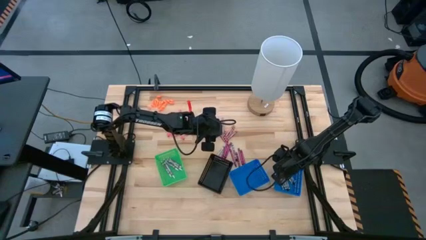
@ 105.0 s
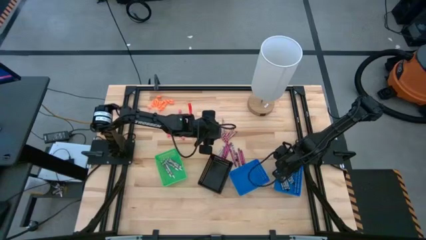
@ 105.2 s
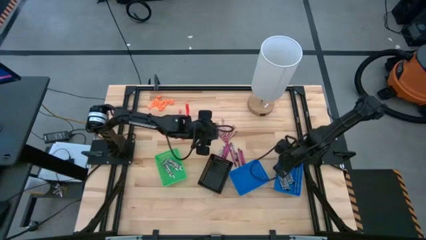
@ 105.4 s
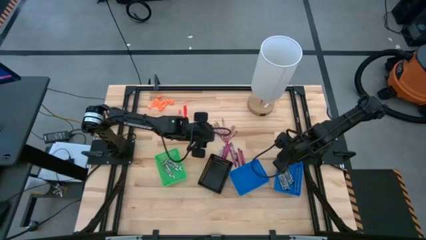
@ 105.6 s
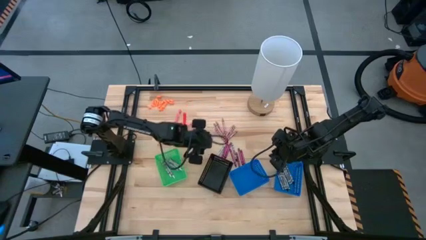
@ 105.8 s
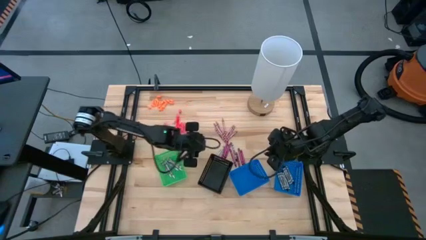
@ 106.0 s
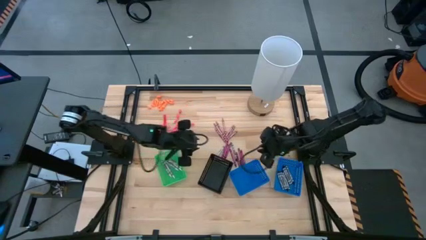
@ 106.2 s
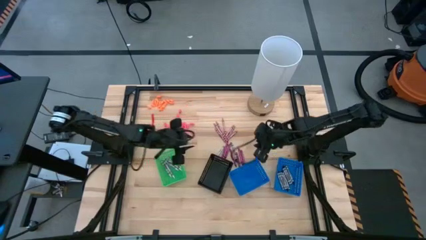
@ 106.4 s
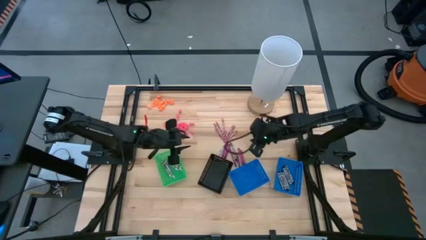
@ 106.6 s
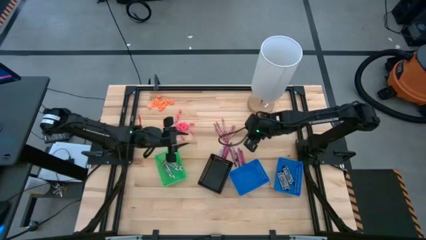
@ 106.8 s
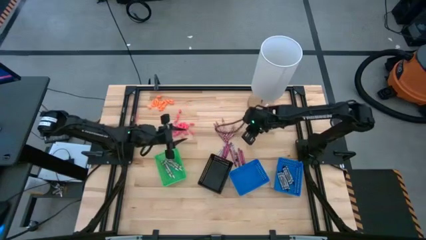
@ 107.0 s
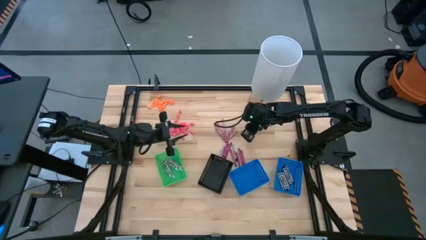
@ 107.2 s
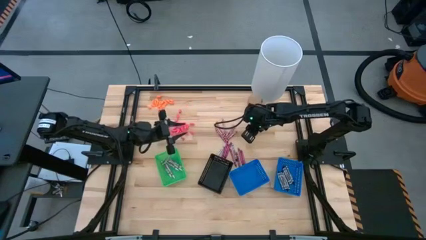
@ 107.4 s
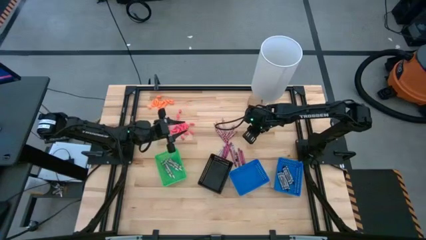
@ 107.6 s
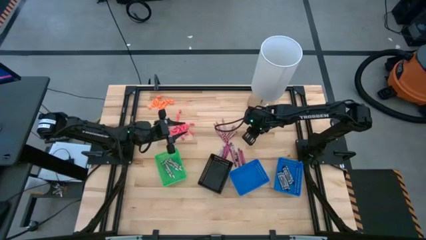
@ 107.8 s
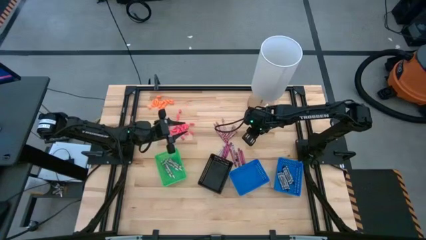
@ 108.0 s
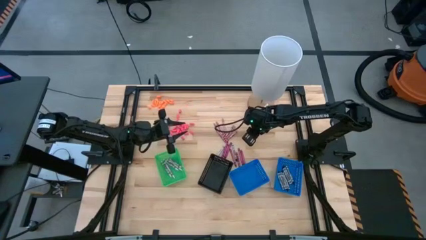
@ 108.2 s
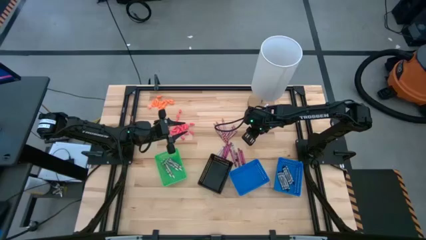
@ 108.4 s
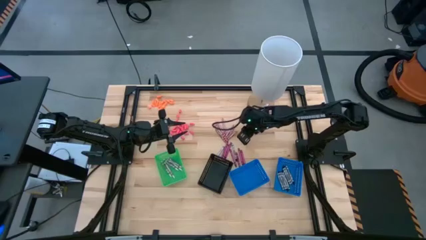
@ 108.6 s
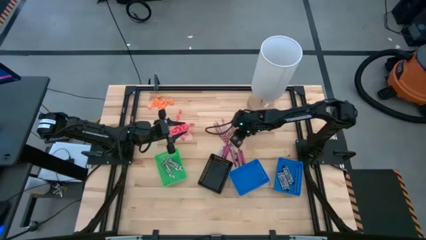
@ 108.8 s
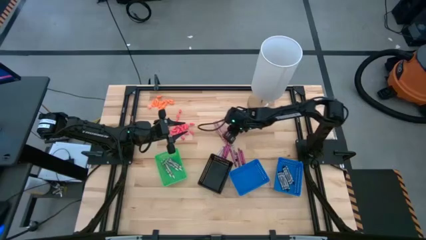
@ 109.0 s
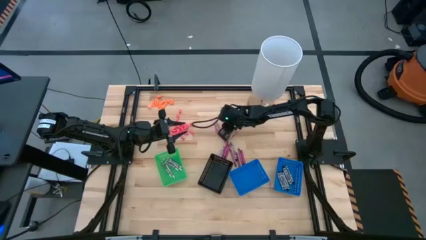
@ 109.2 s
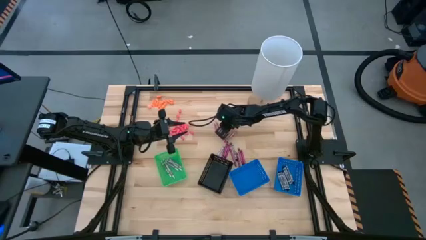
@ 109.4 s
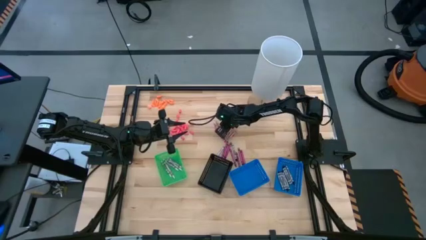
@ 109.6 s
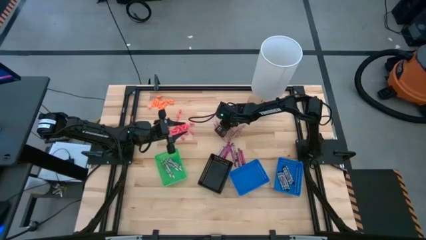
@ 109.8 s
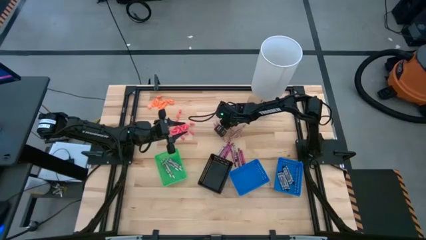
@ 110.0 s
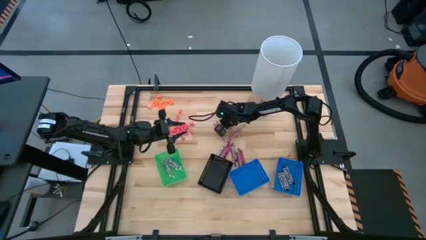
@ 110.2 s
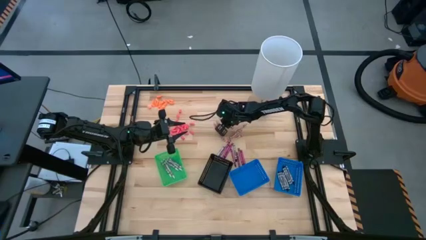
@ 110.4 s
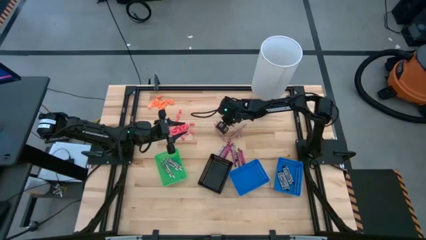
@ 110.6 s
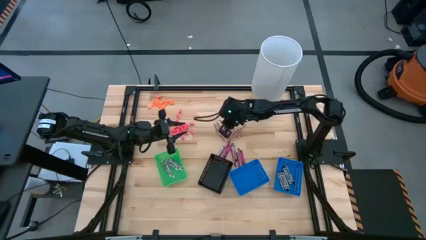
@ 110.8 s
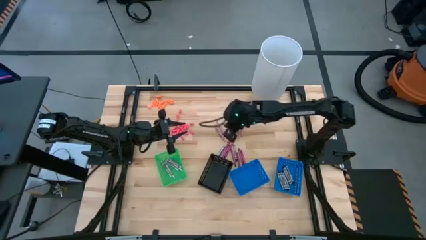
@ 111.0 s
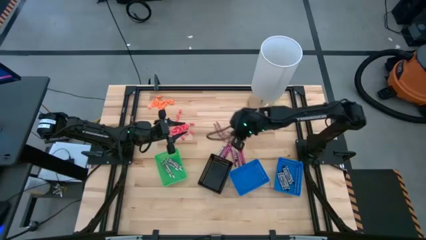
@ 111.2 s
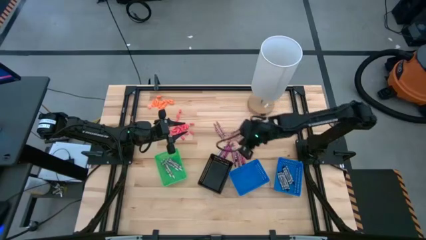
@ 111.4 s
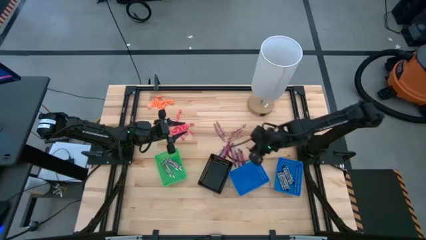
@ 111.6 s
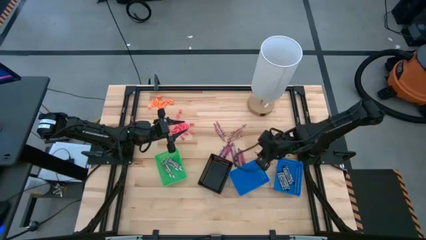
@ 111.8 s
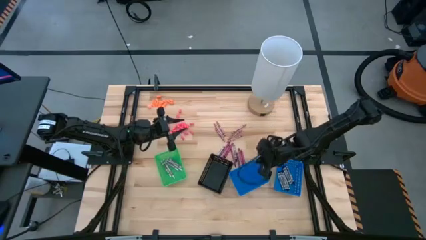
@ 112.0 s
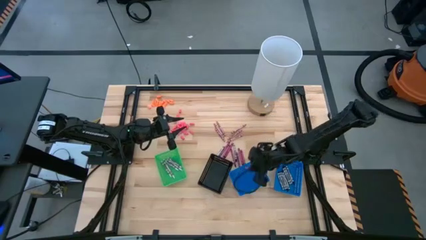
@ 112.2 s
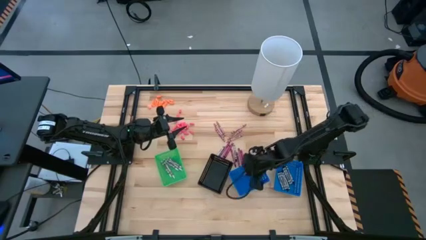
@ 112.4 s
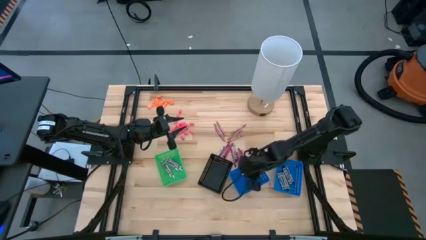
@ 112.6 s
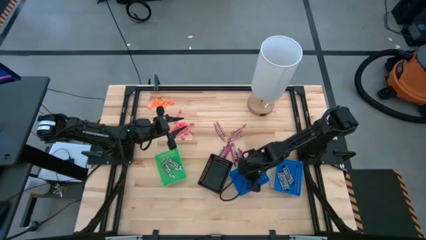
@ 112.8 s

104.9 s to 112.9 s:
Task: Sort crayons
Put the pink crayon into the left blue bin

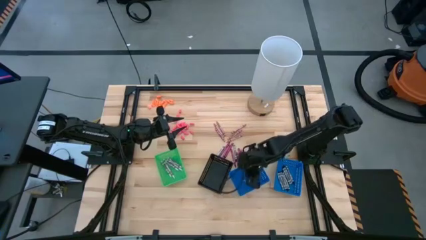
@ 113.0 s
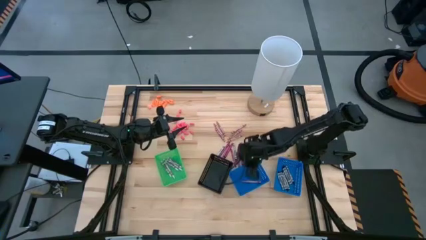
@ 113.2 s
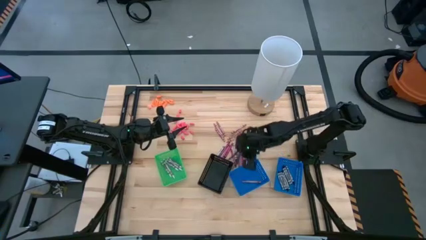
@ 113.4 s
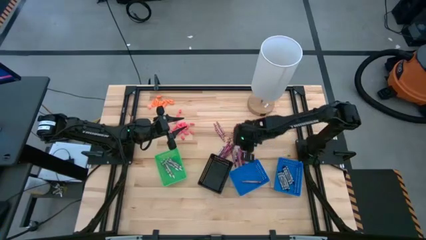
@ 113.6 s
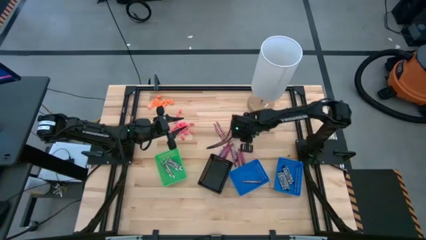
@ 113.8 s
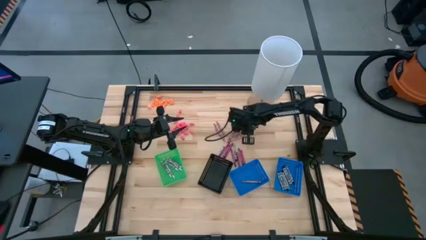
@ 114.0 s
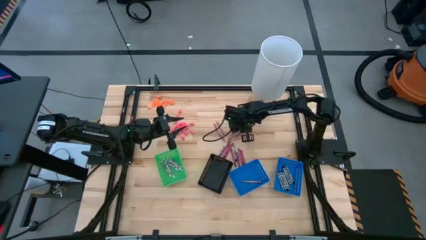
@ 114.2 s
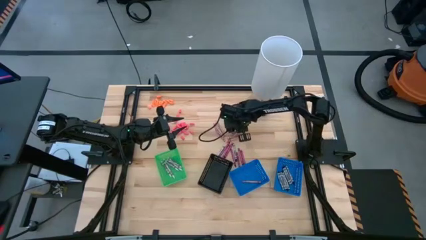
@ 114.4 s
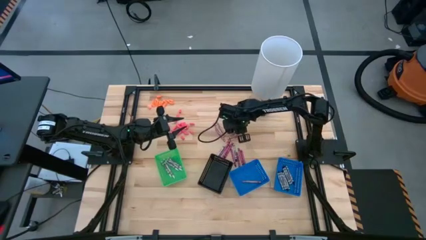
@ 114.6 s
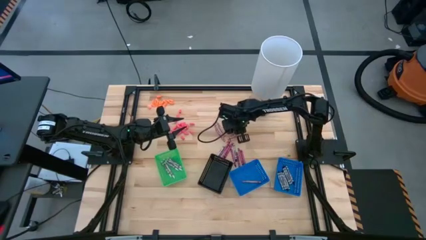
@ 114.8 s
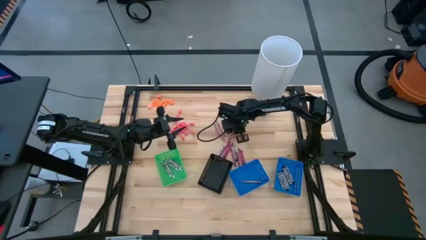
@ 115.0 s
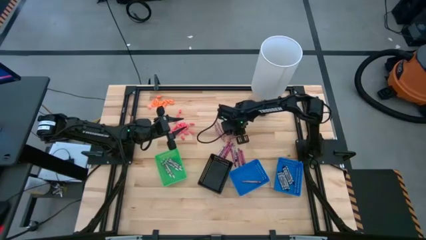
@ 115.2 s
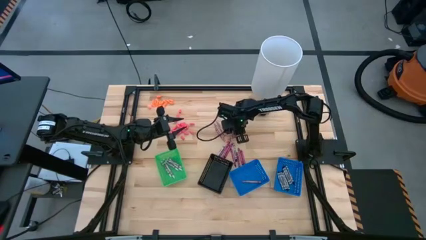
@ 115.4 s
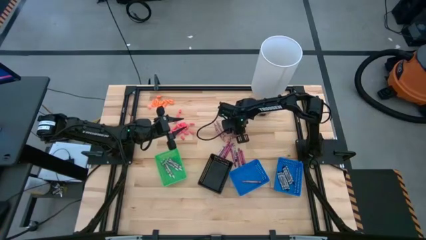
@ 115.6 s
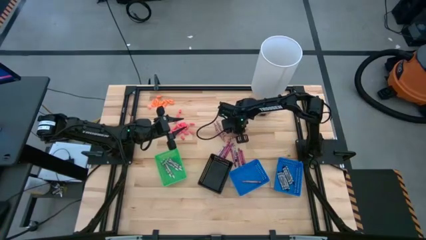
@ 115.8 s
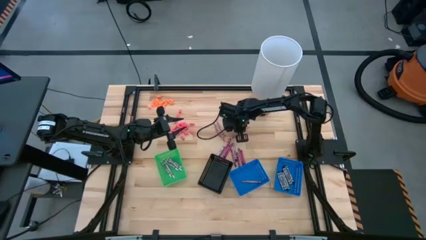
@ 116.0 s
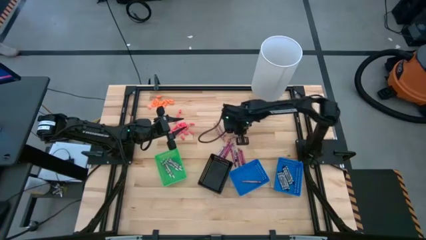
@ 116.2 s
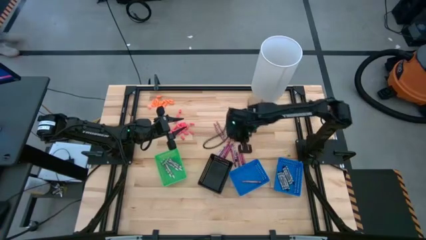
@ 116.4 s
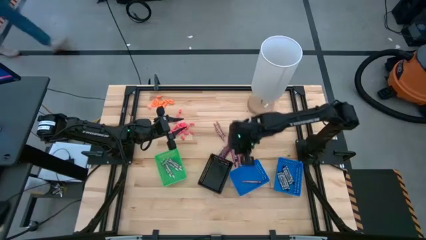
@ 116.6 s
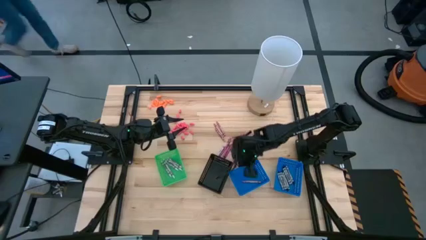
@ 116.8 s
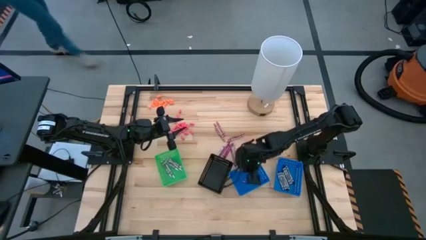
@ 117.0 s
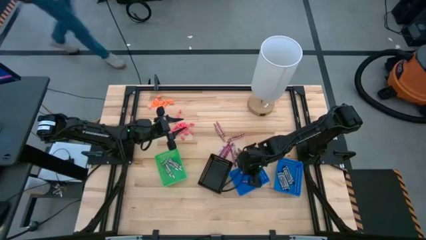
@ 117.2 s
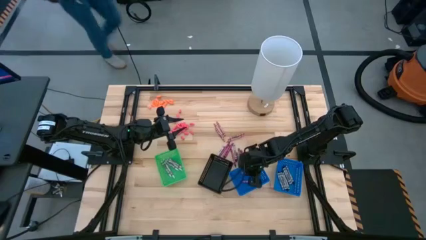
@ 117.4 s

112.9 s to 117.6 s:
Put the pink crayon into the left blue bin

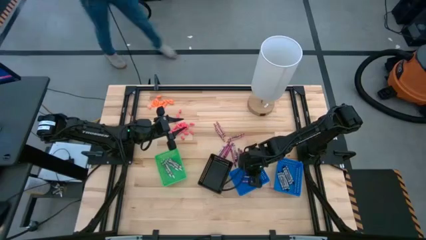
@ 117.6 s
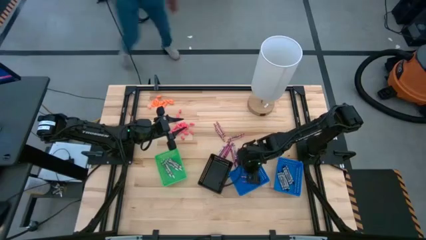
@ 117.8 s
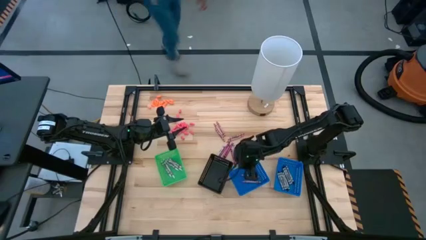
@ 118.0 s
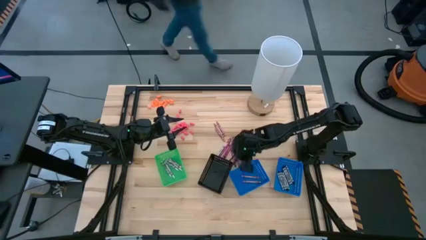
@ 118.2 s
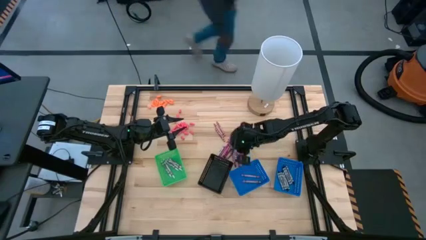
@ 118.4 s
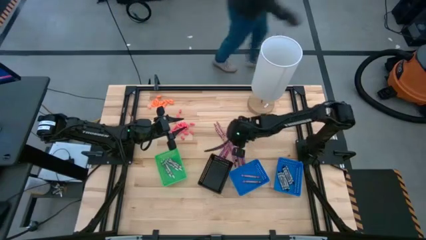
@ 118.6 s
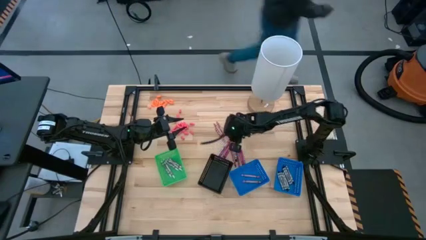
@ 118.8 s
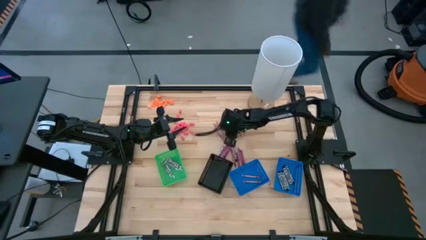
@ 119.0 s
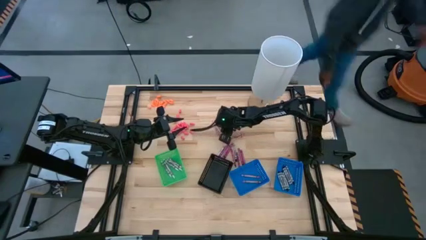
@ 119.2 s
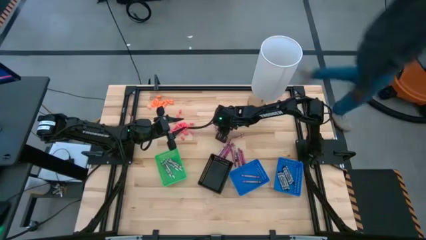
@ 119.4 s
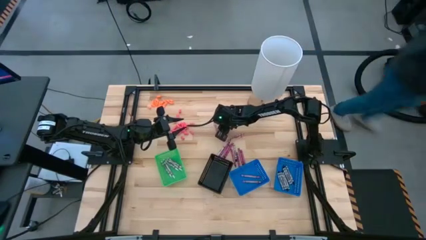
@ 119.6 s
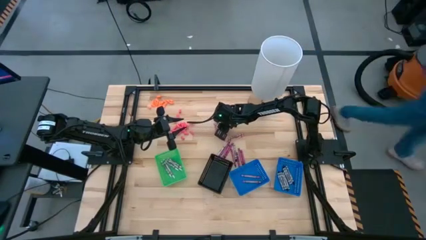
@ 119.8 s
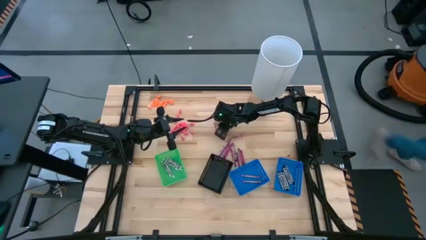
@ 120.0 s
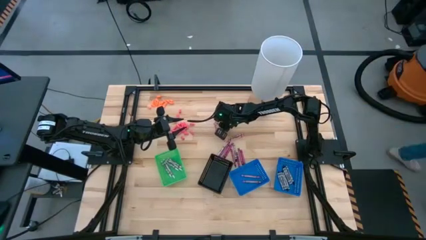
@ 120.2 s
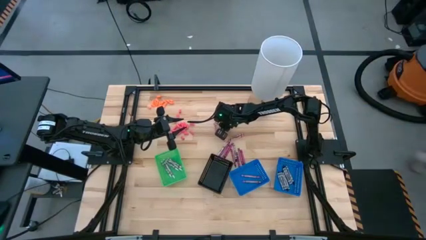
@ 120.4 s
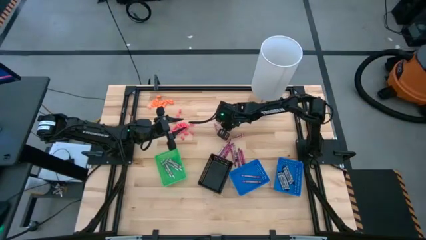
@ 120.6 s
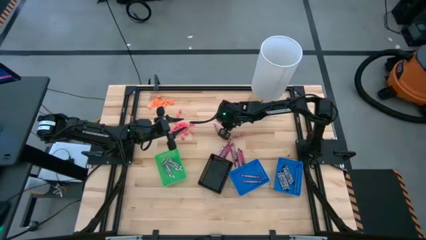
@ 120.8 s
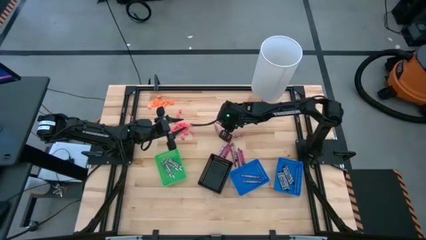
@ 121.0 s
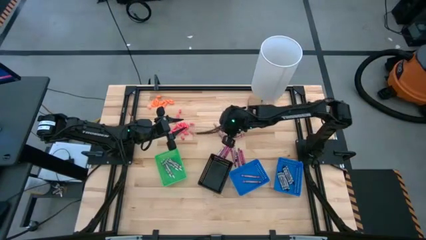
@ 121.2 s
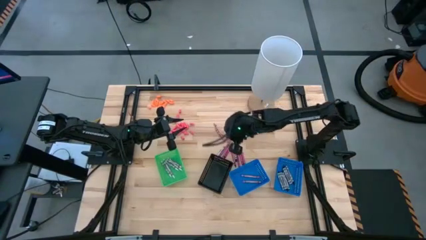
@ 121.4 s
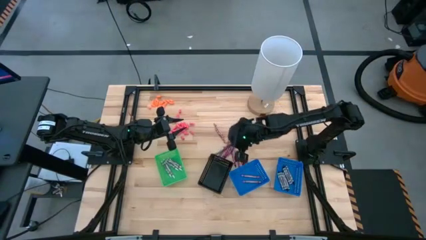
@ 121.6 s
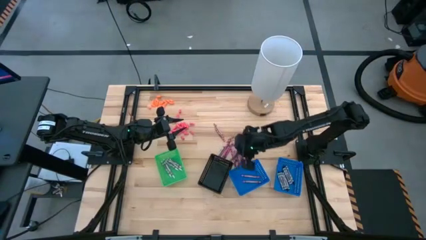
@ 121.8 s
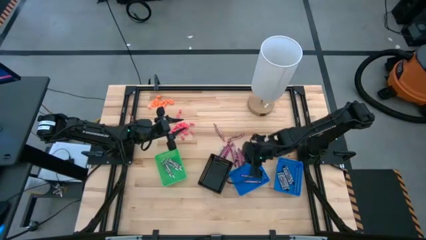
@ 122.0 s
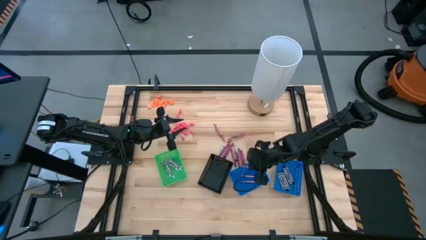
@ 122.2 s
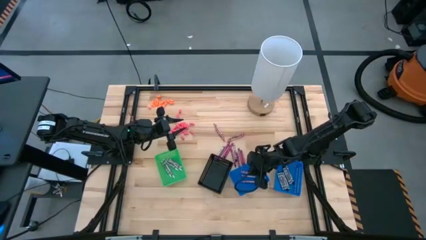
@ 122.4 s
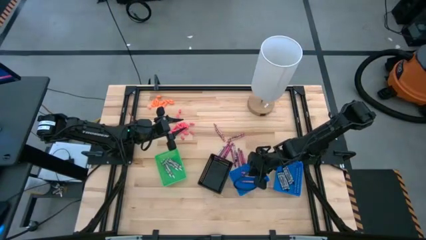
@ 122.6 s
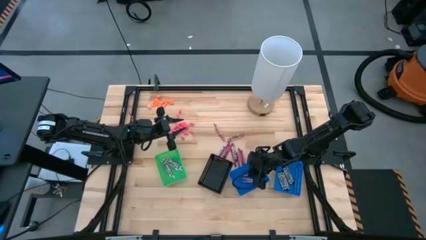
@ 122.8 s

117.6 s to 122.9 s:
Put the pink crayon into the left blue bin
